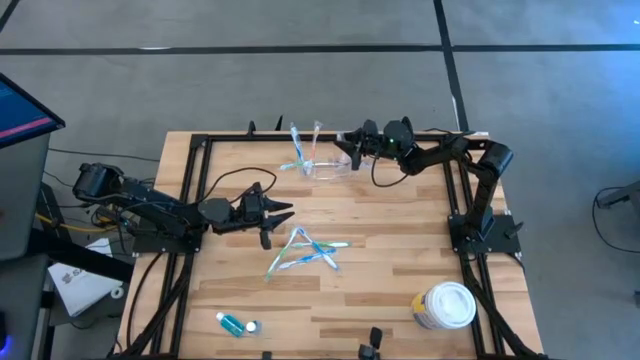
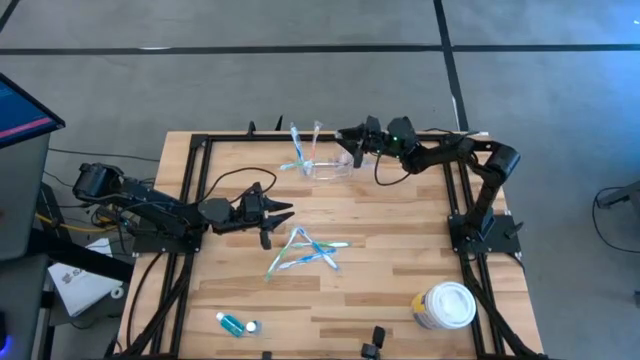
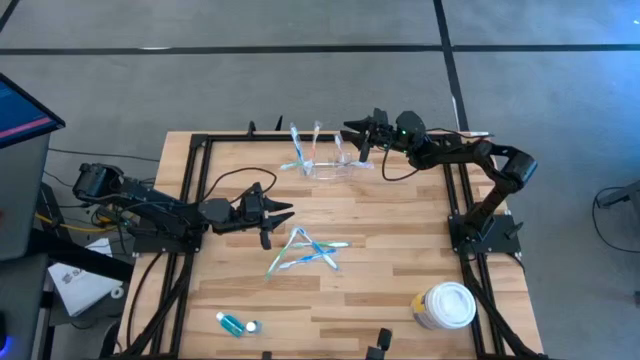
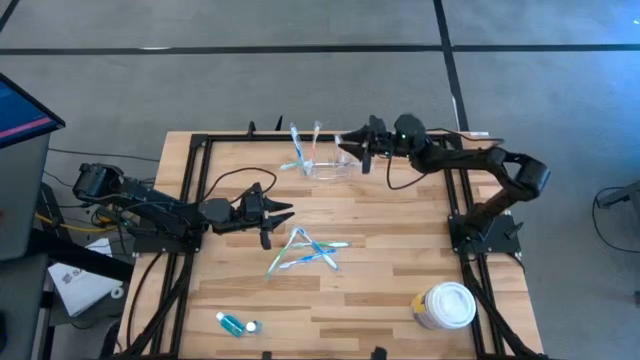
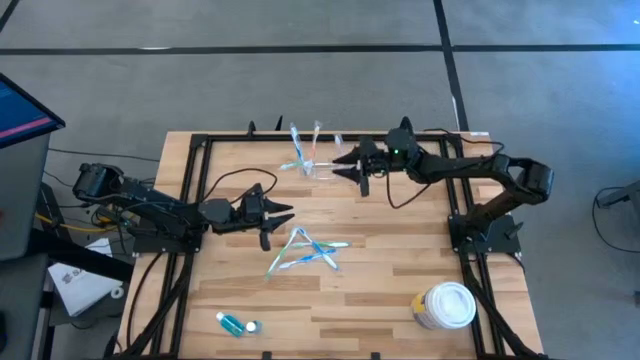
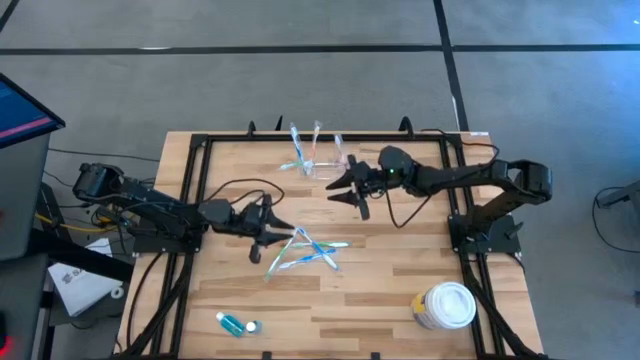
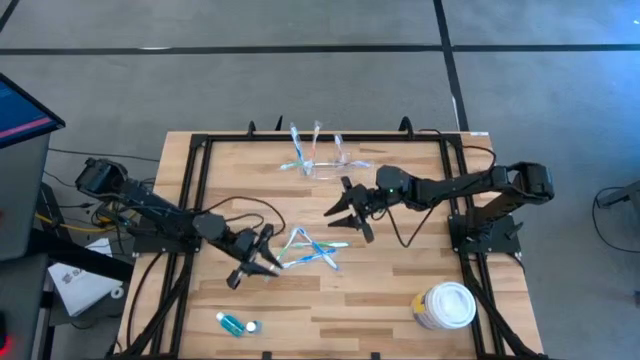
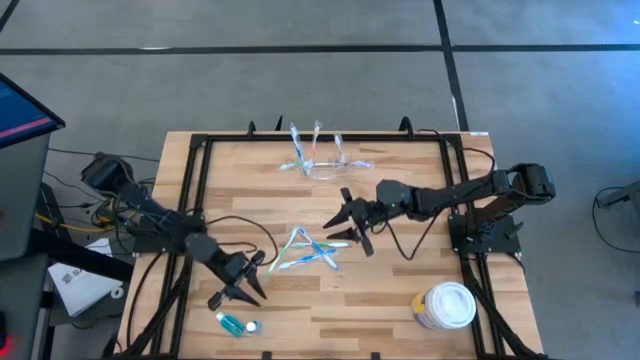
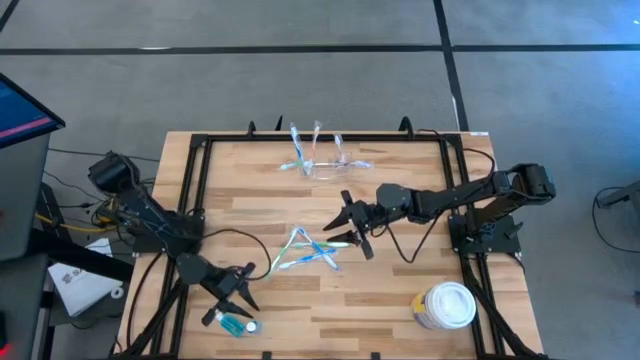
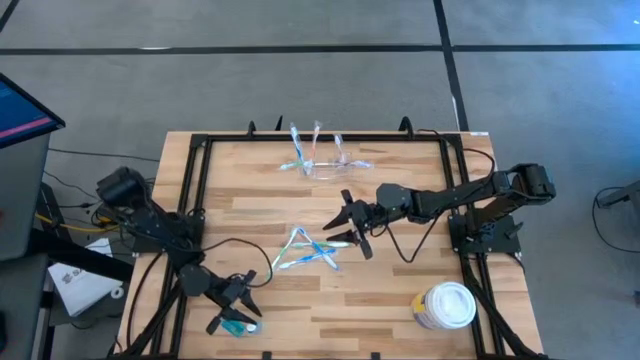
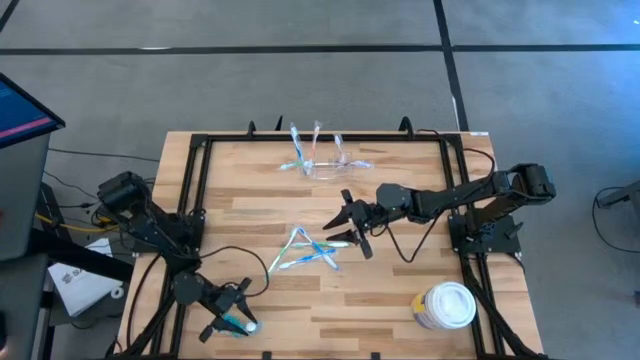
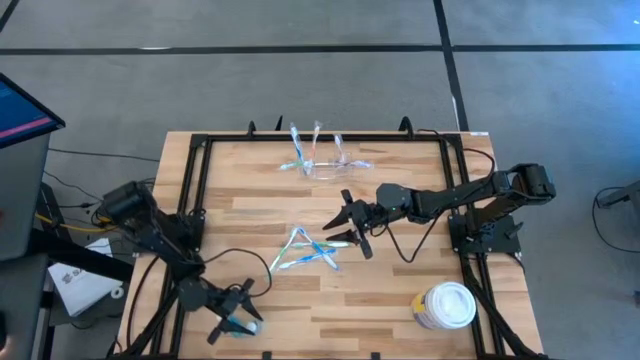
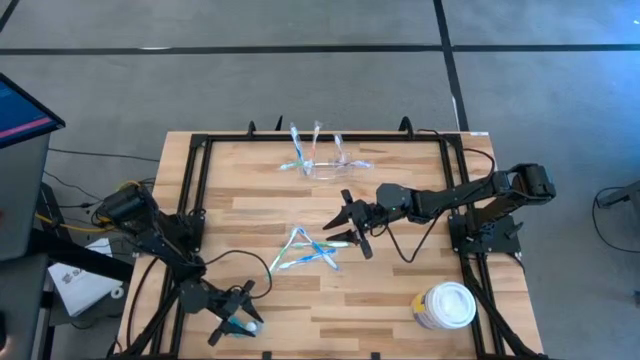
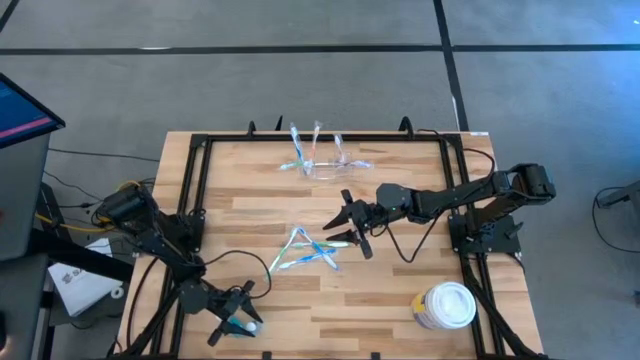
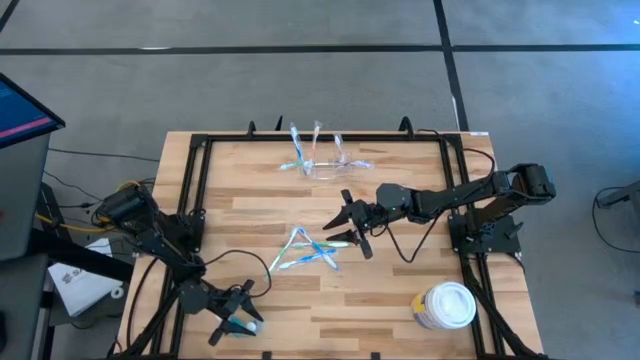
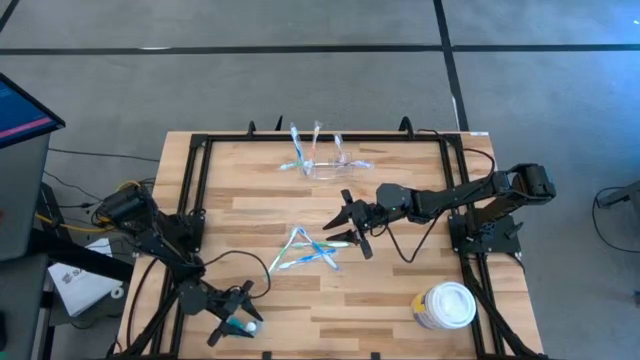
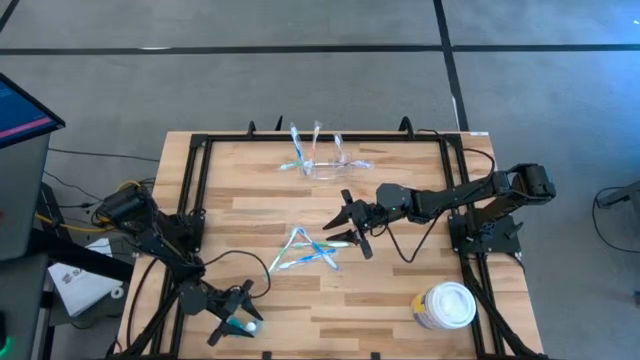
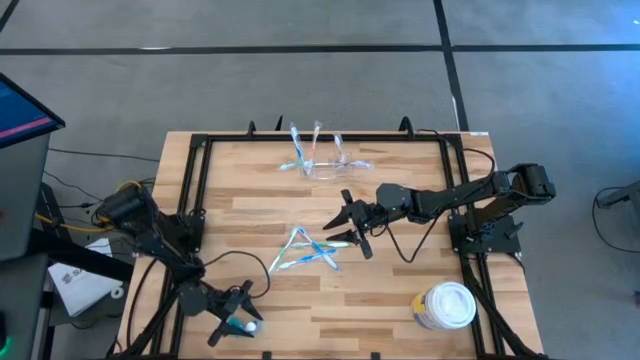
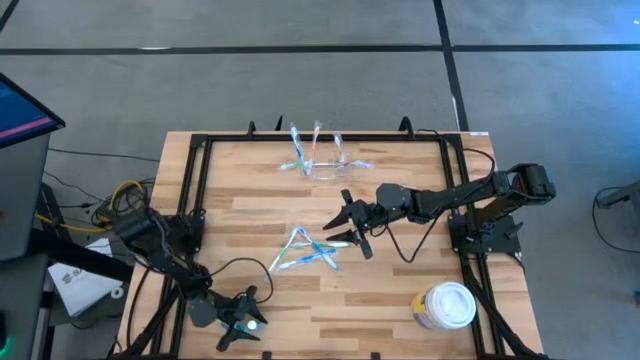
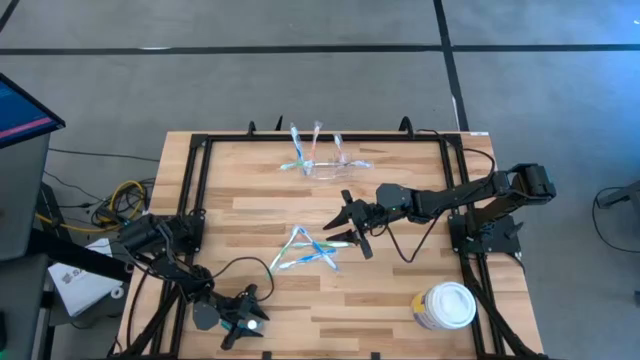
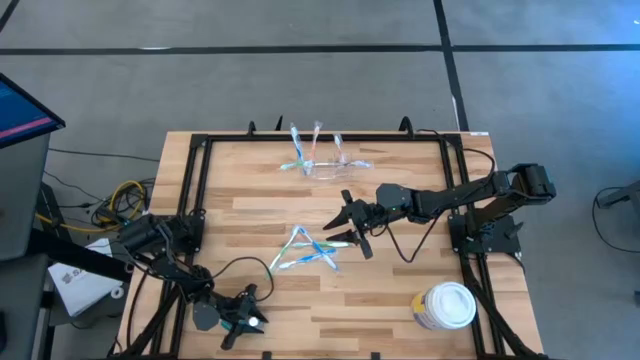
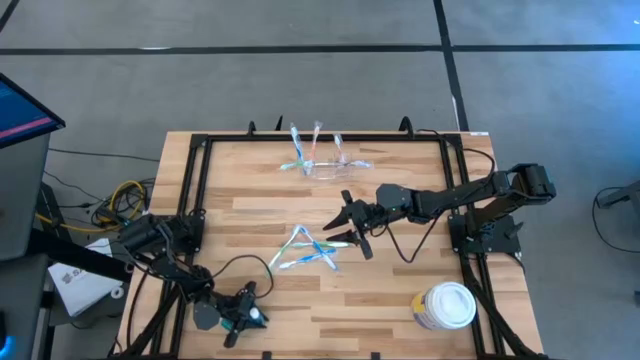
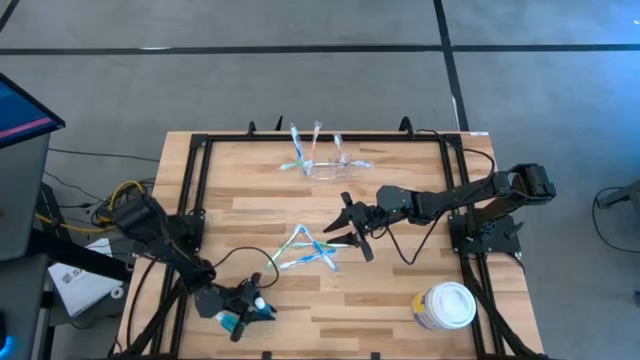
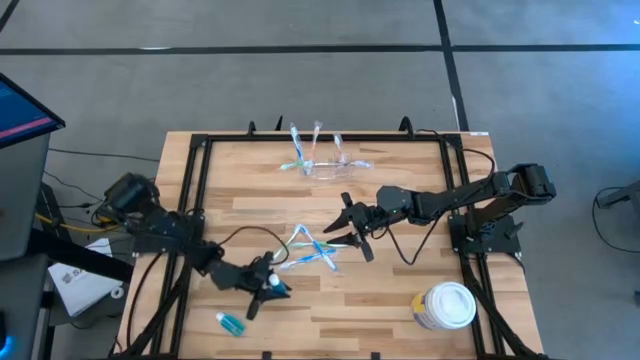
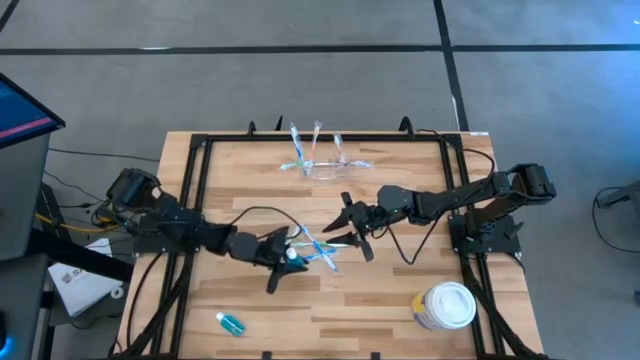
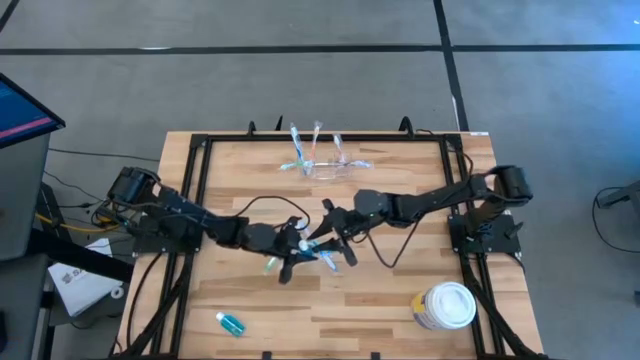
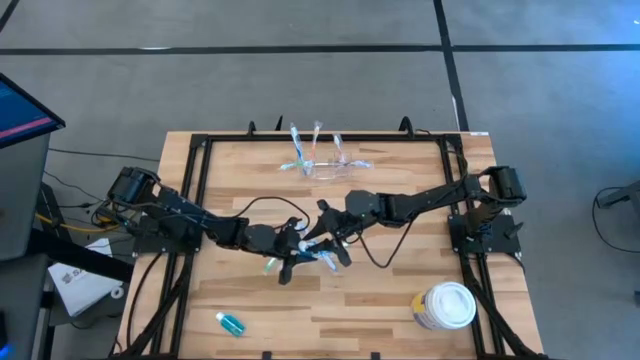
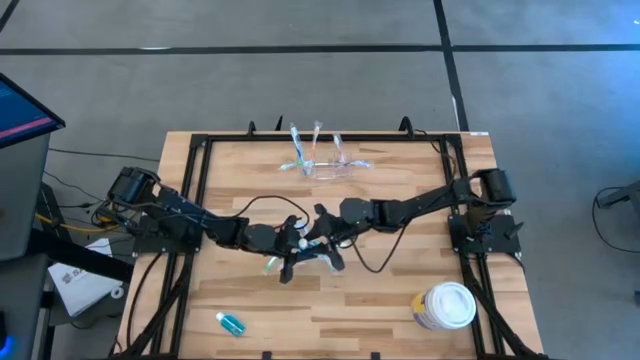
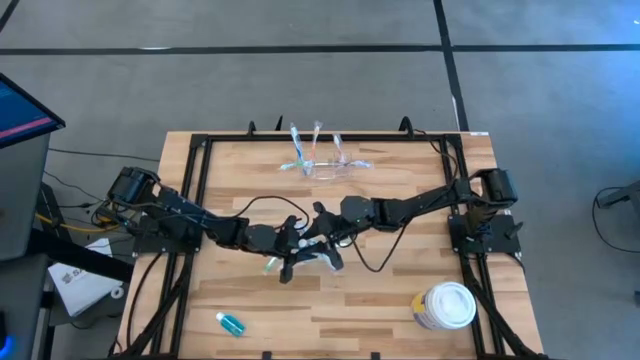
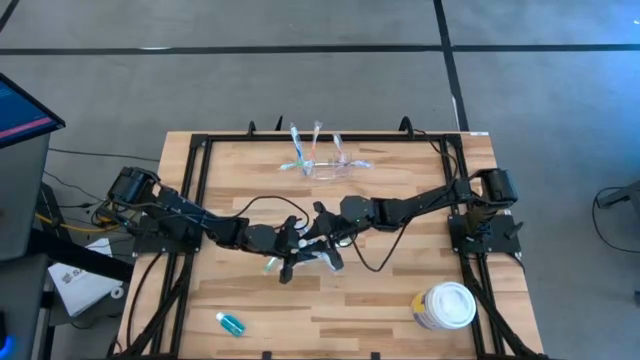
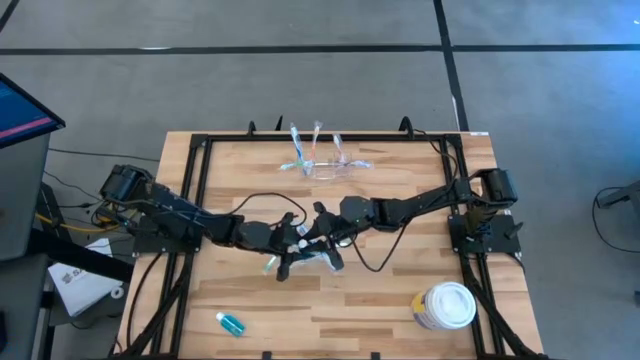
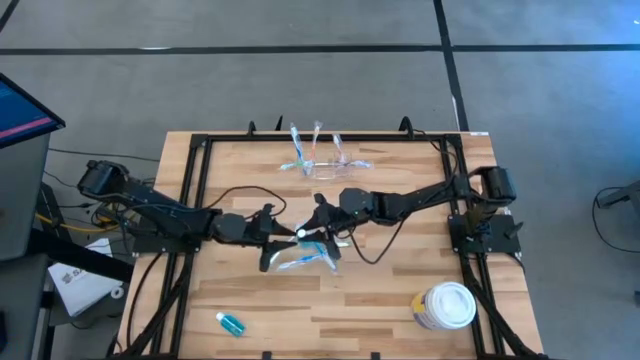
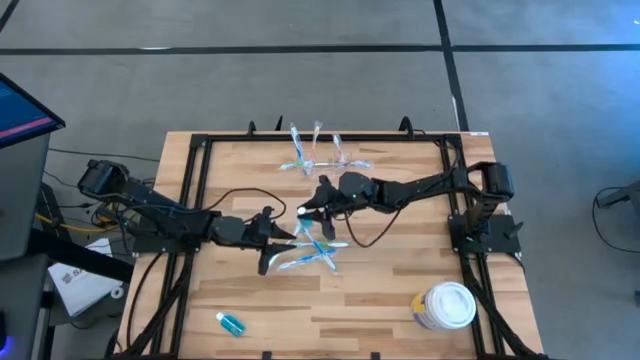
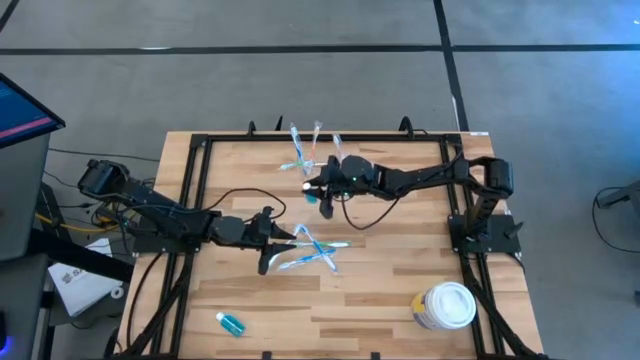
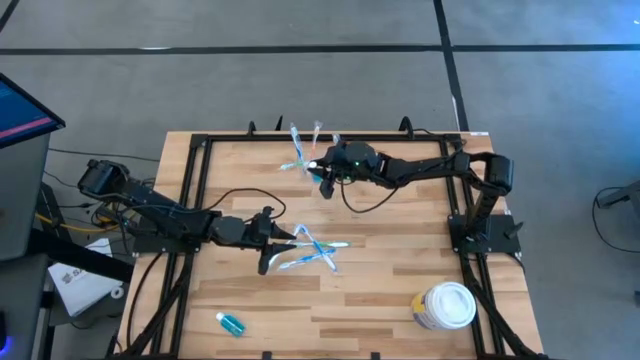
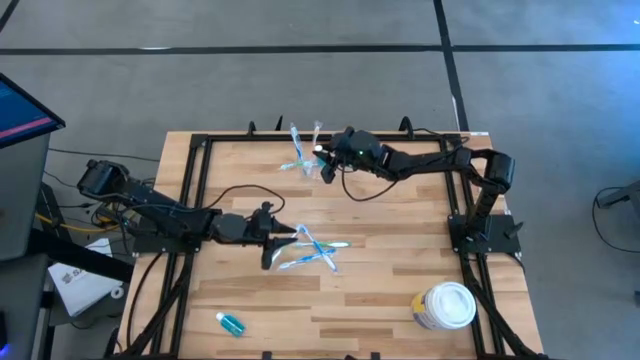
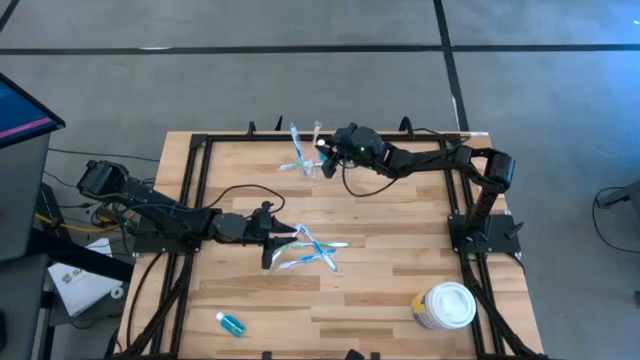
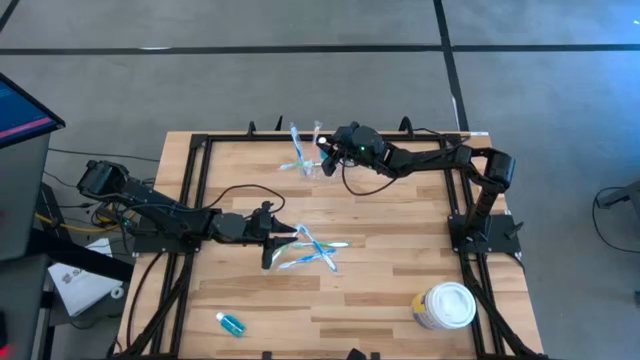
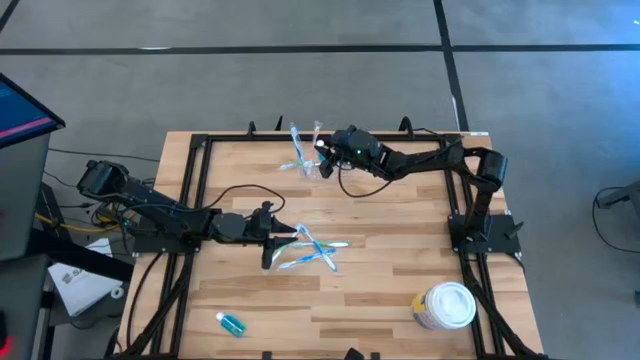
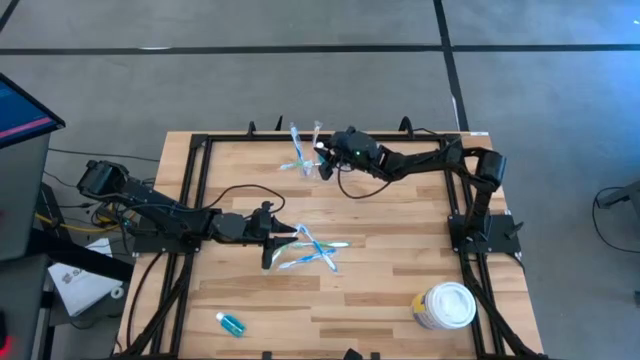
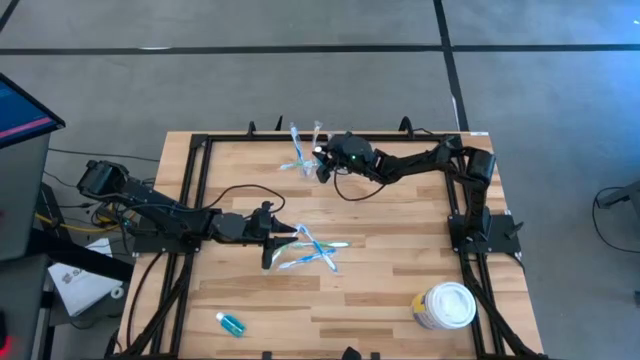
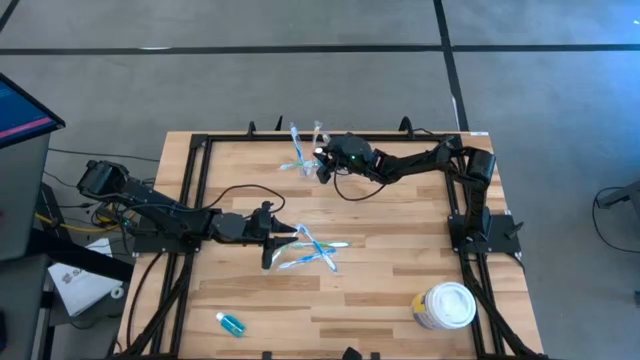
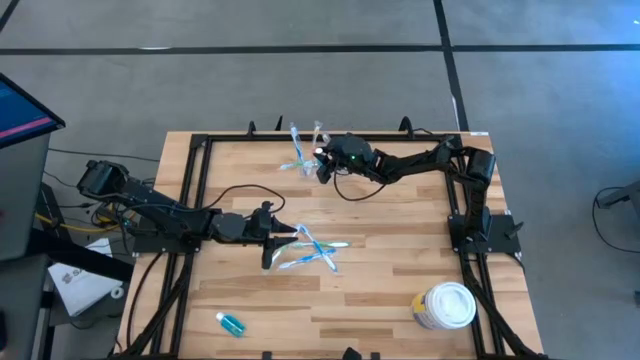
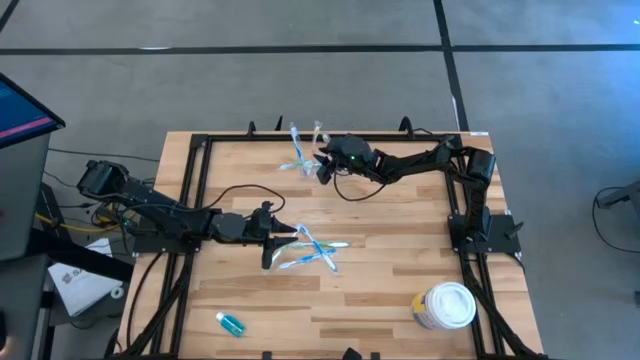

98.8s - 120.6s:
Task: Pick & Place toothbrushing station
Put the blue mouthwash into the transparent organizer
